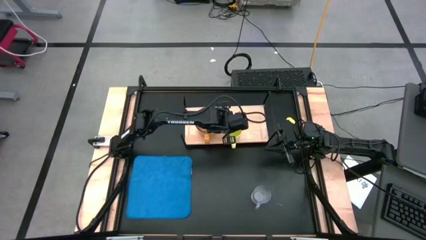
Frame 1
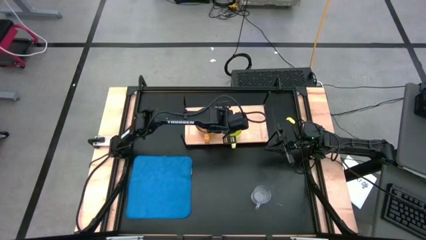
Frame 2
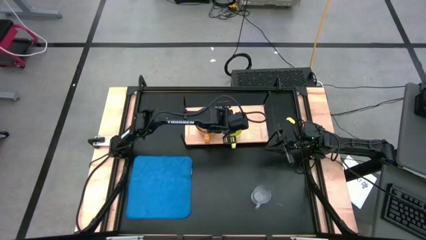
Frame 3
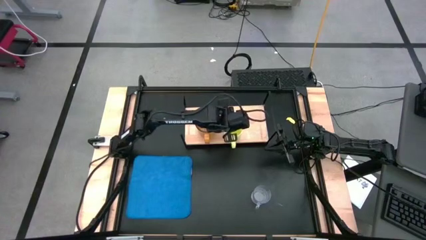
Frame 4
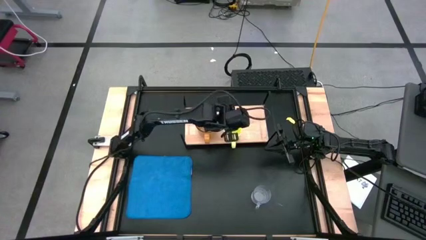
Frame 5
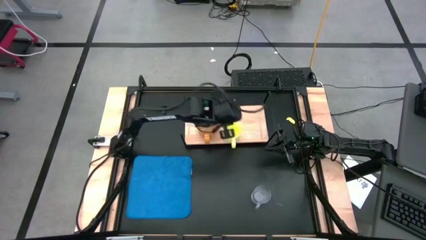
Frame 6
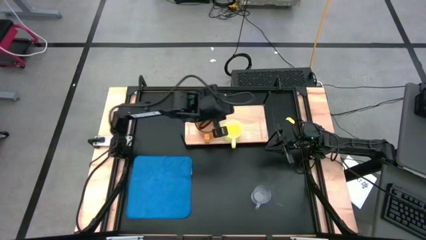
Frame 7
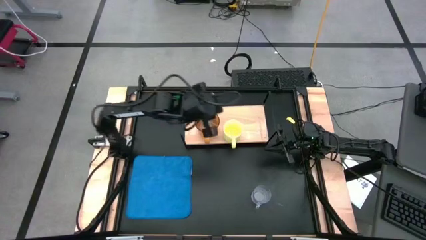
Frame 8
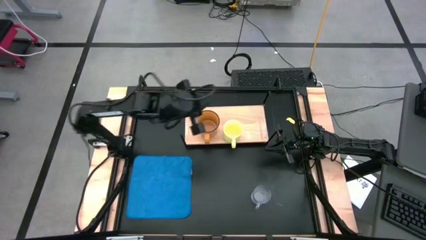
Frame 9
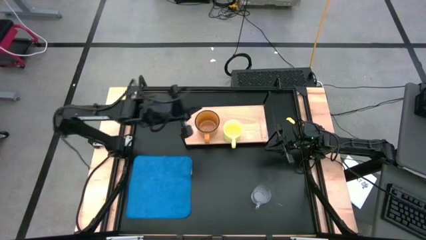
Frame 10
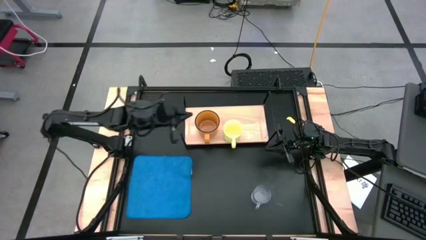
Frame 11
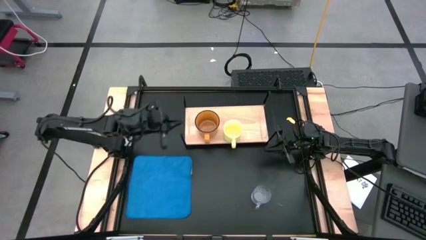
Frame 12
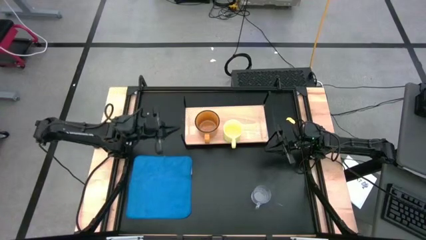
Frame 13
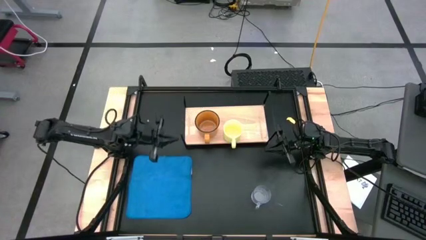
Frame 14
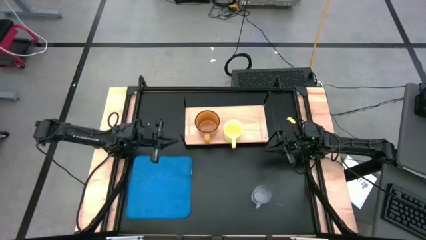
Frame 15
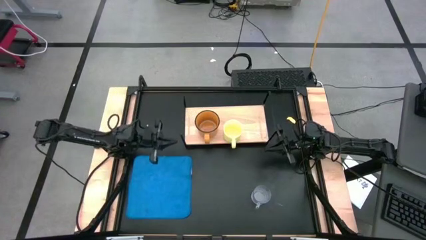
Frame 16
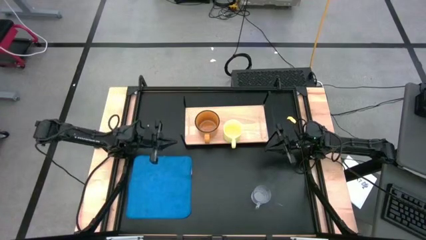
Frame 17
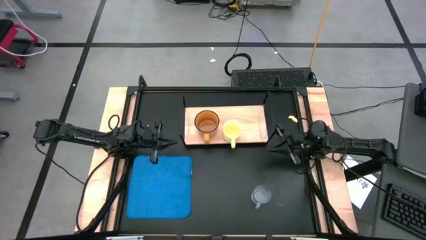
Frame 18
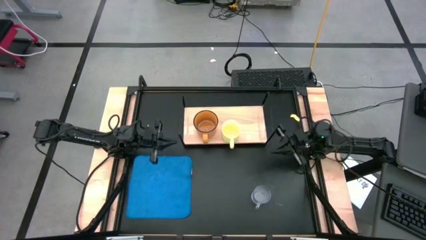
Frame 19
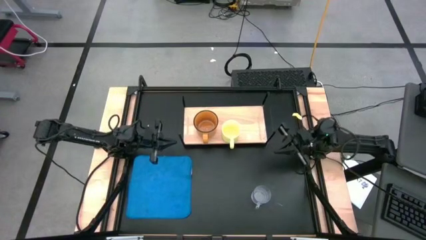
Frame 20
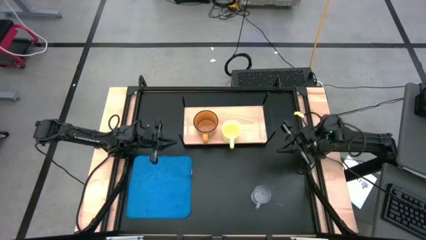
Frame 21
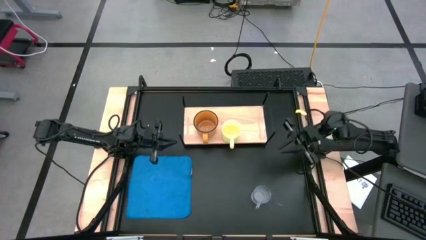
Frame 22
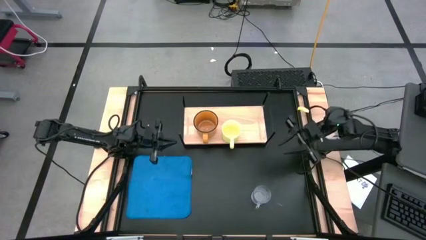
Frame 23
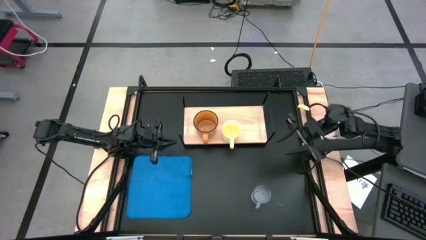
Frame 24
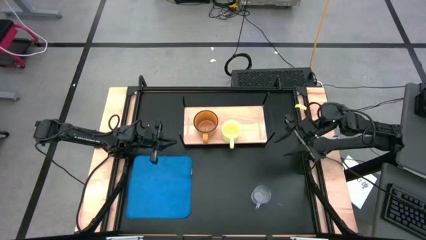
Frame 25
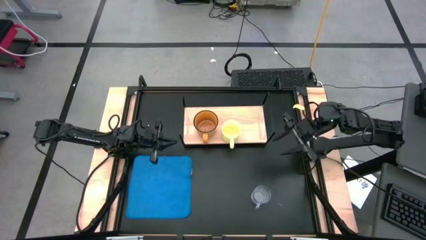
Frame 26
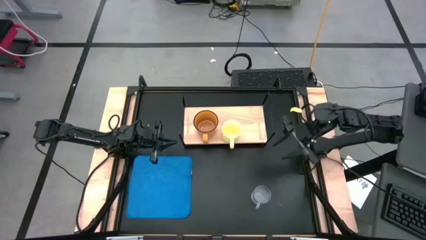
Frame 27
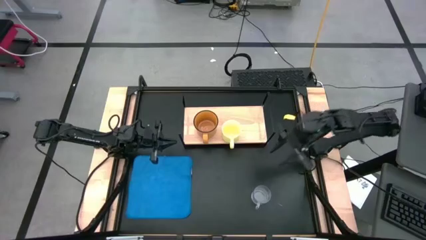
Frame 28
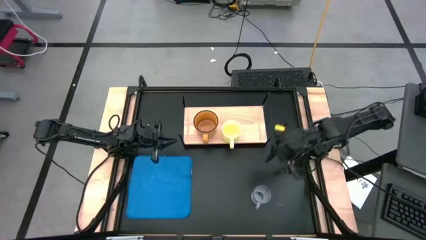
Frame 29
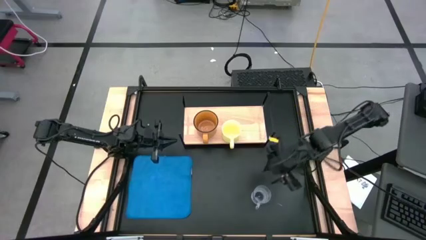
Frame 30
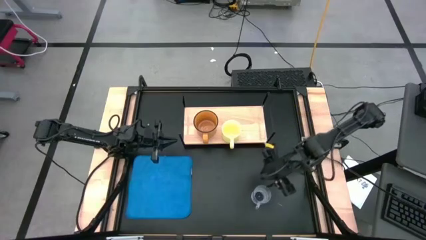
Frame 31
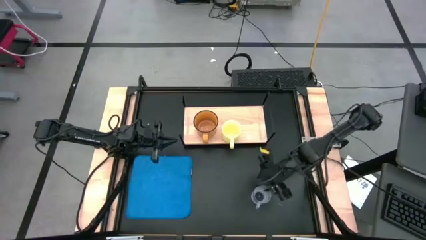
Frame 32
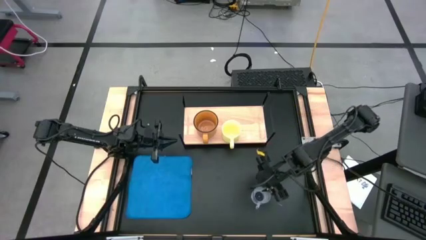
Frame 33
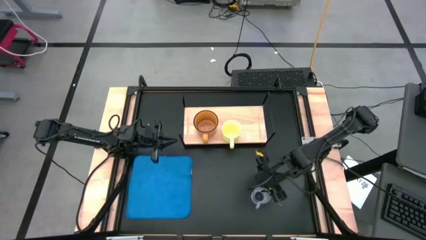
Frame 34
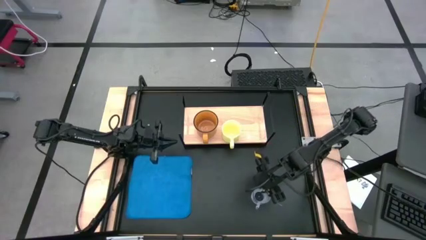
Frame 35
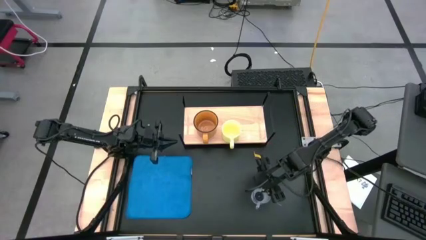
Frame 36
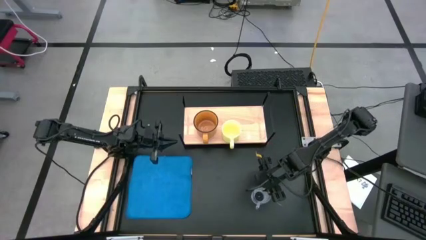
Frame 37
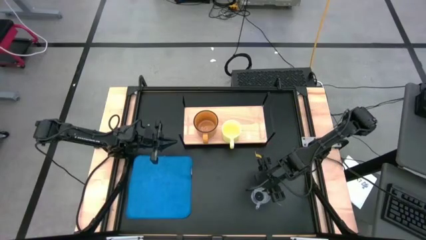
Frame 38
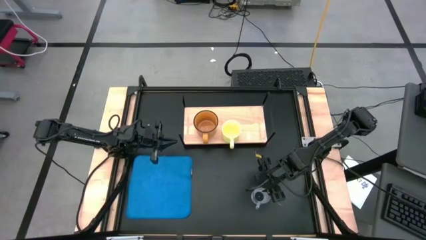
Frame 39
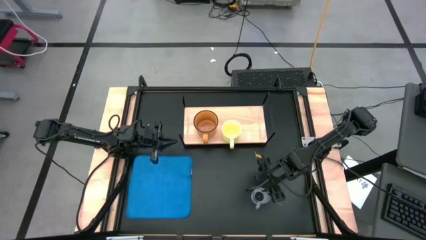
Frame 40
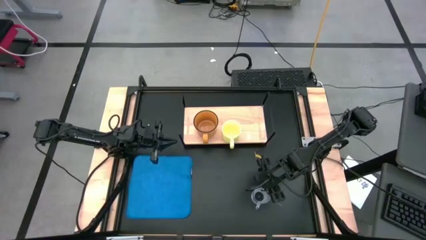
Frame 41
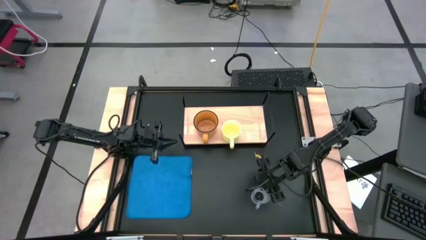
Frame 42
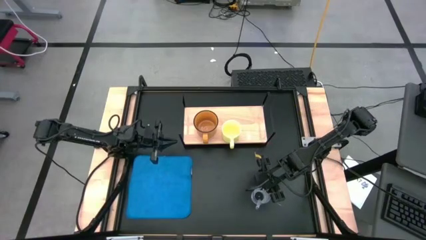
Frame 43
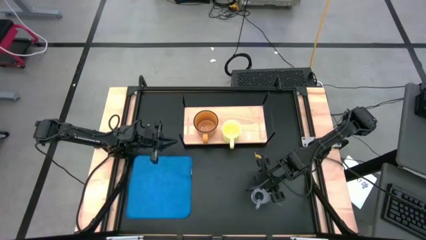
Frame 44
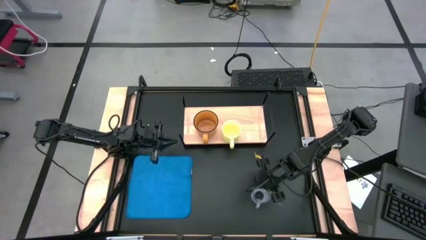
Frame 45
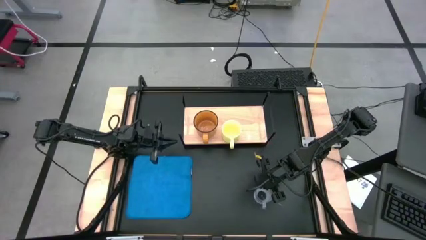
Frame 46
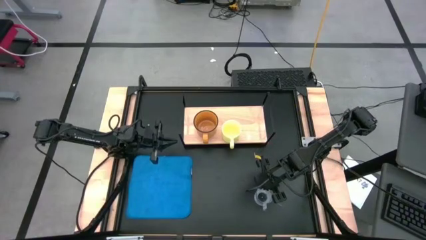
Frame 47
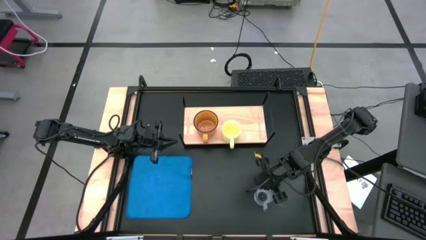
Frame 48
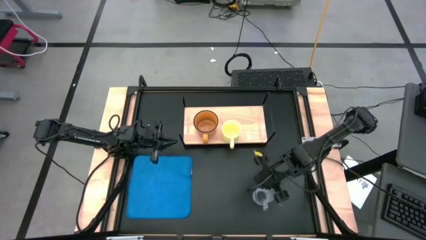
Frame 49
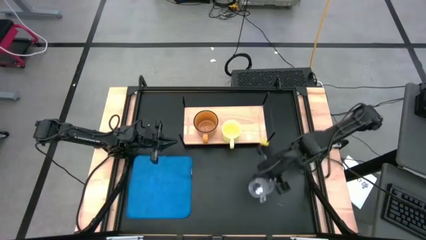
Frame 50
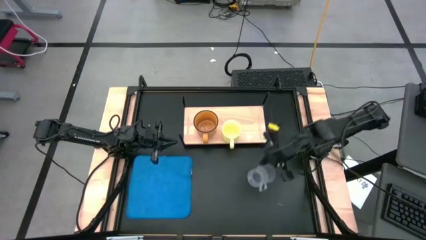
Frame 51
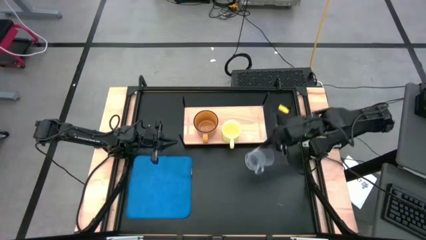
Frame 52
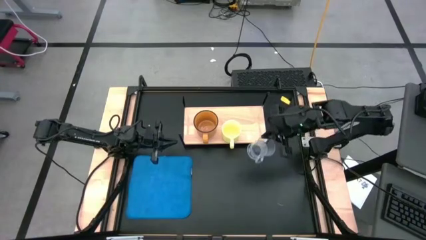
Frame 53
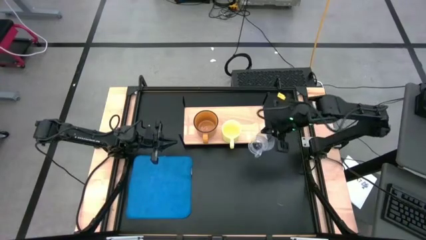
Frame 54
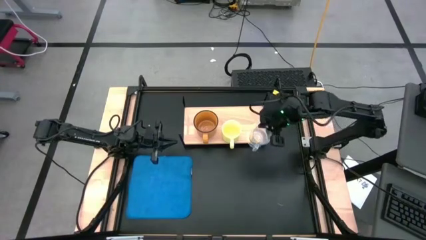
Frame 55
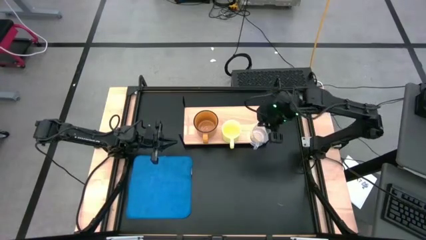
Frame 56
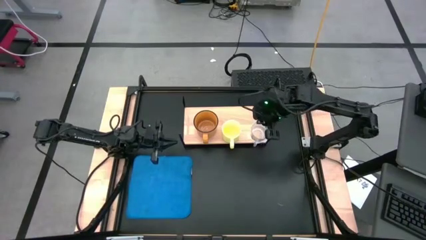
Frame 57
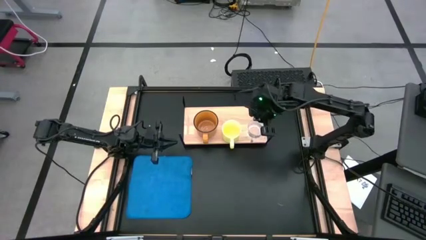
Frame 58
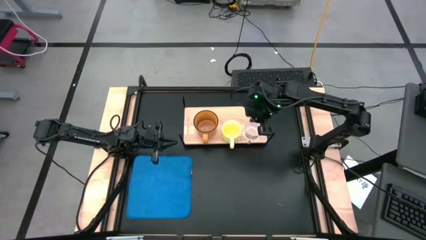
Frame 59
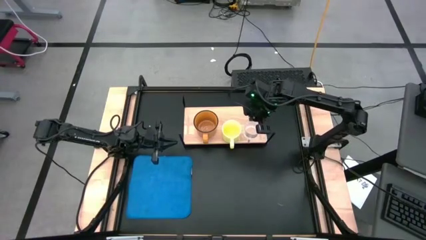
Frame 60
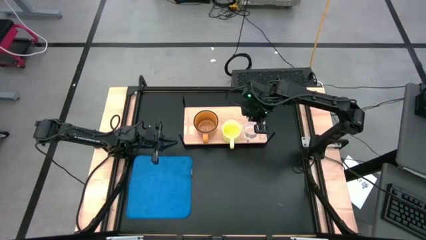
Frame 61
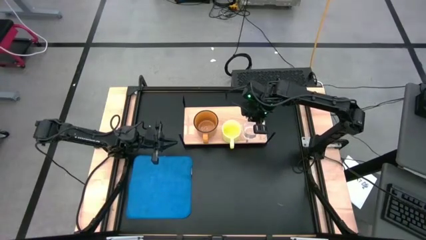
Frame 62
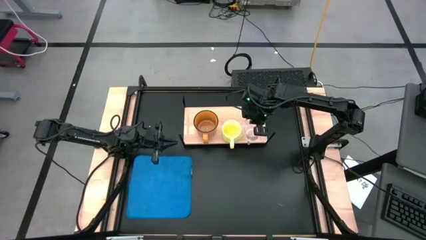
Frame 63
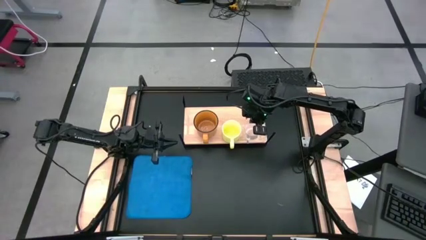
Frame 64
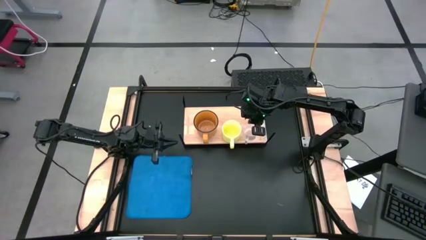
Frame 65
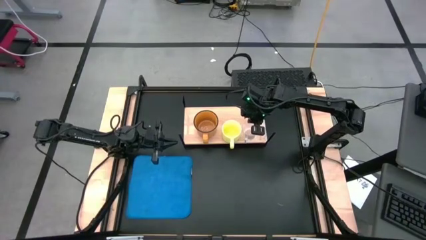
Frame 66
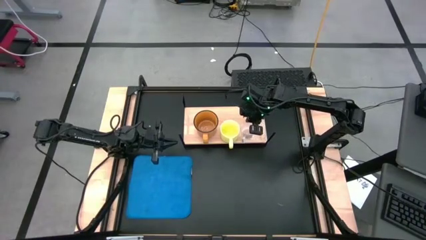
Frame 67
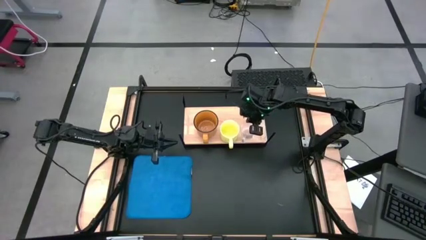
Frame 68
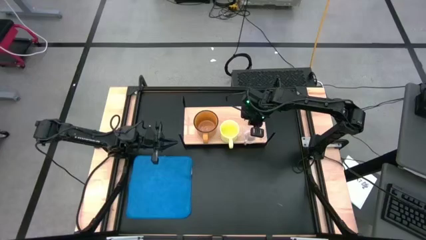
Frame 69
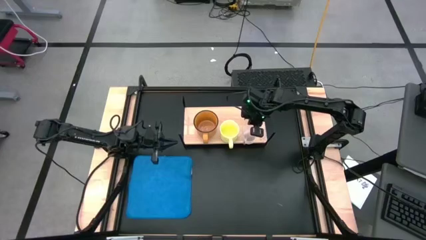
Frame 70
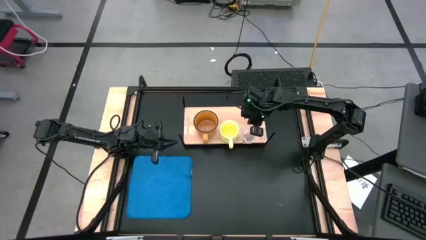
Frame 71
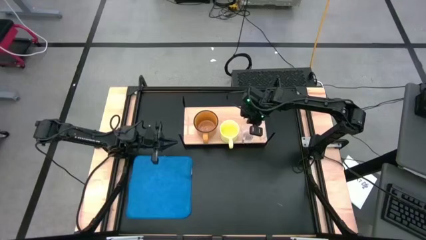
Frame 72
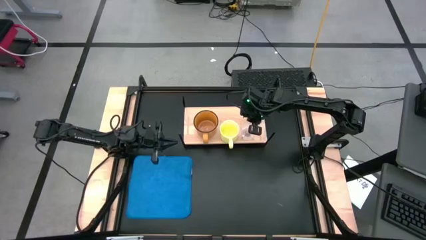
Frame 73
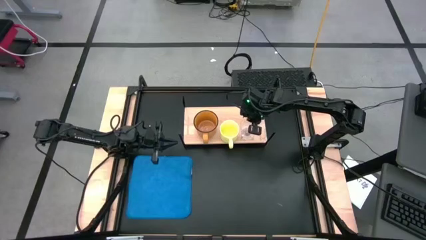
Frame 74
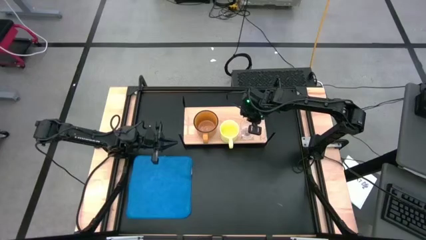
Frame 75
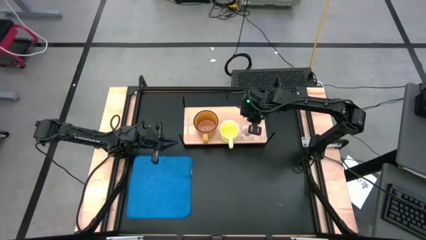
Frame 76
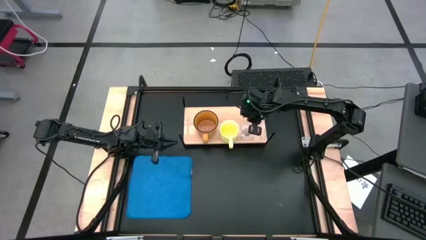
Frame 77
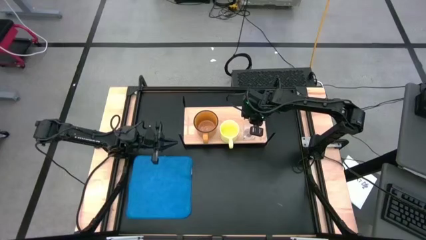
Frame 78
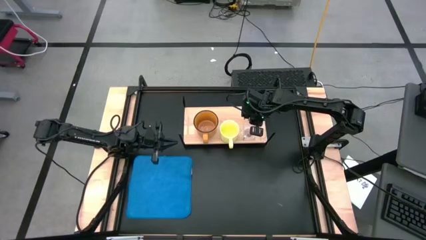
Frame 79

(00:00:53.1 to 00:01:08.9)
Task: Stack small to large cups/mugs on shelf
Put the transparent mug on the shelf
